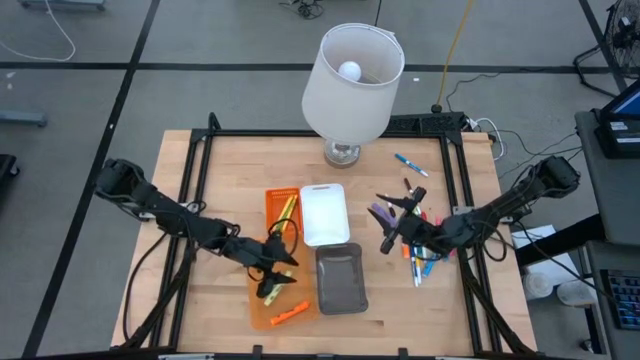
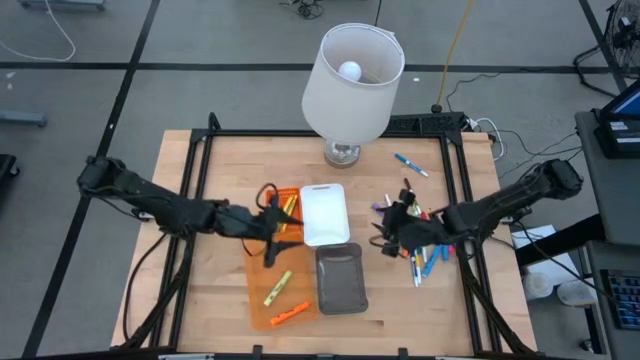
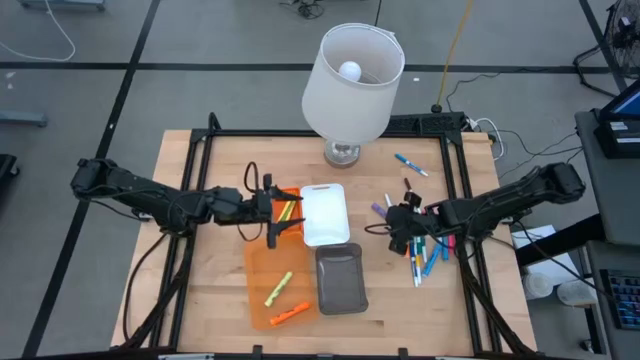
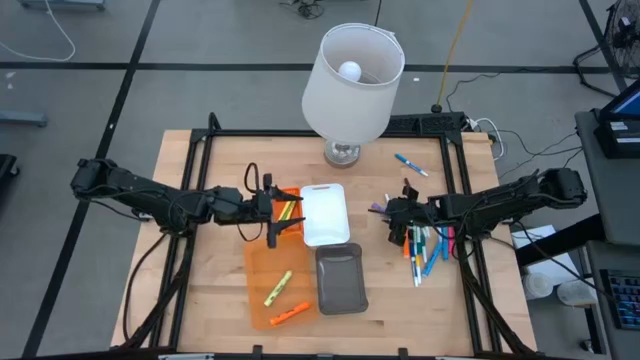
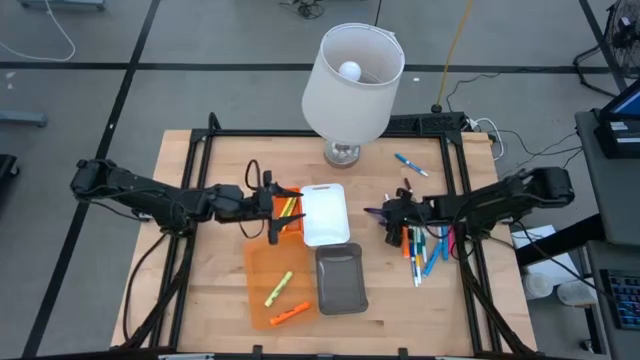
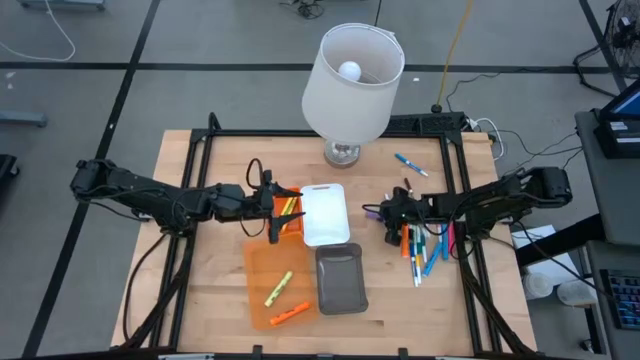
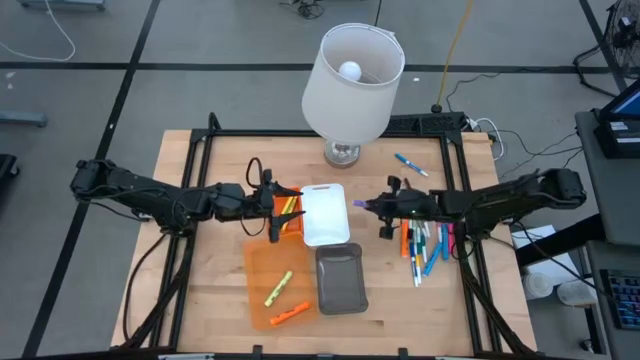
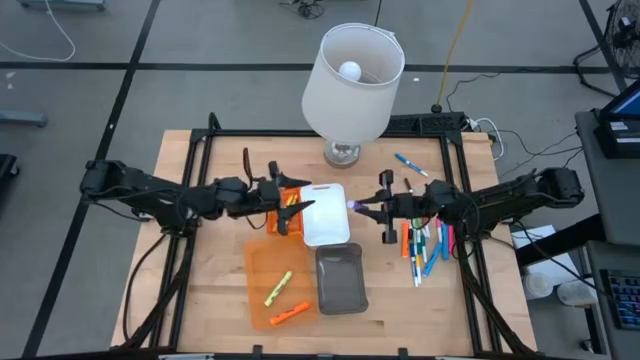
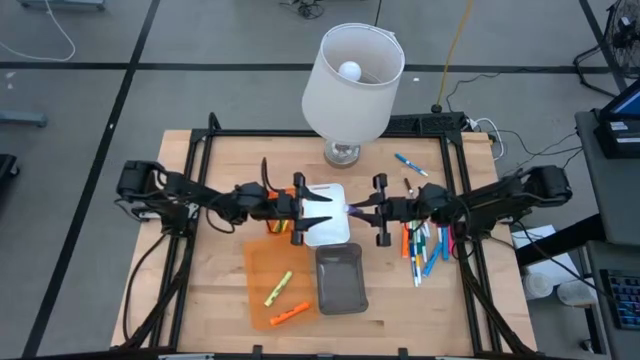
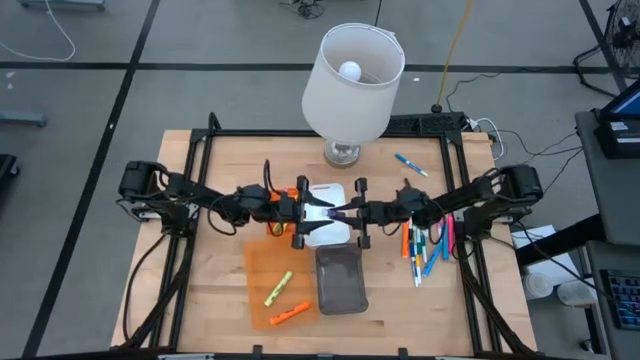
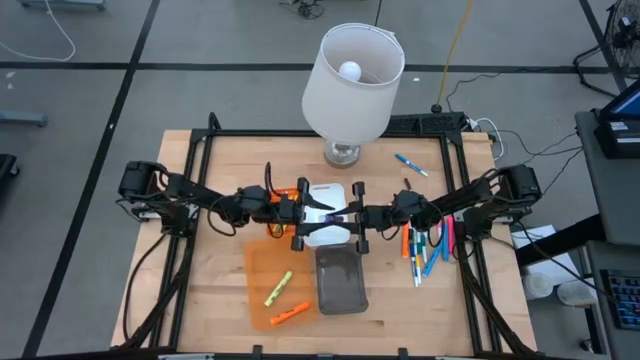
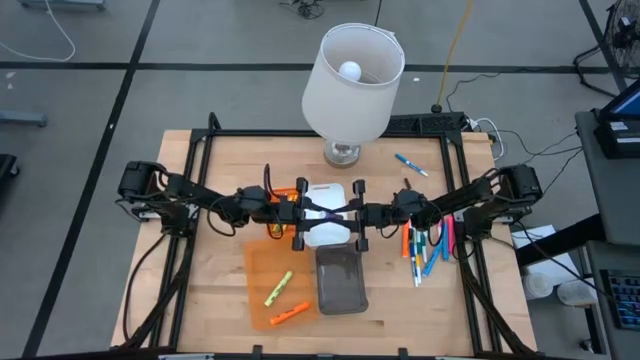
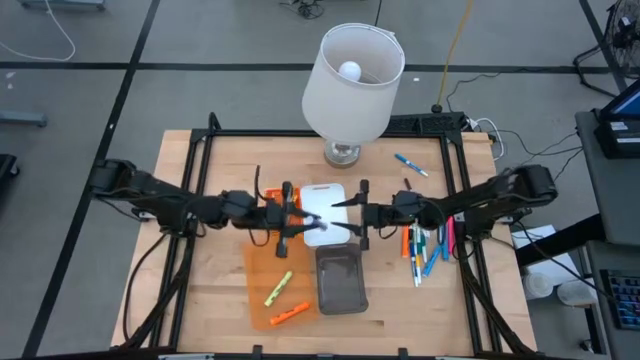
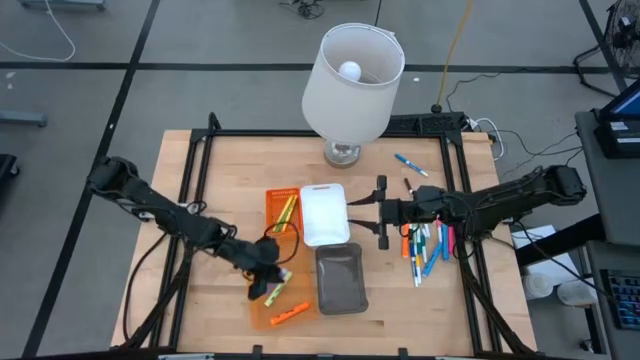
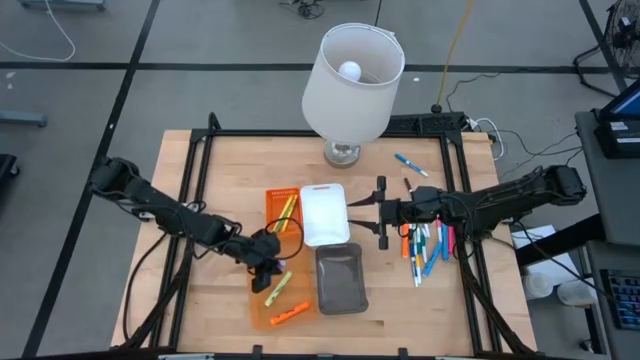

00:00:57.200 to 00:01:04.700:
Task: Pick & Place Markers
Put the purple large highlighter pen into the transparent orange bin

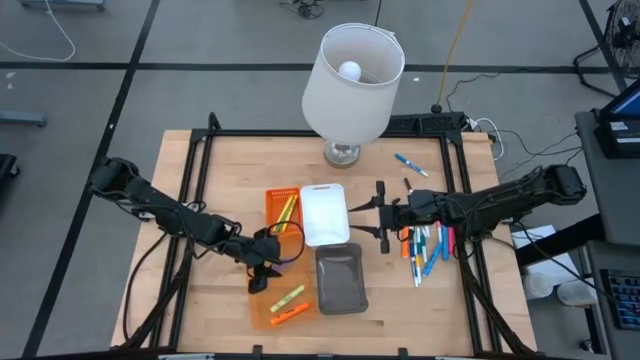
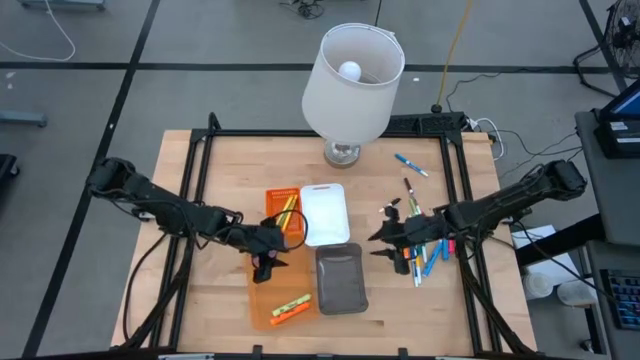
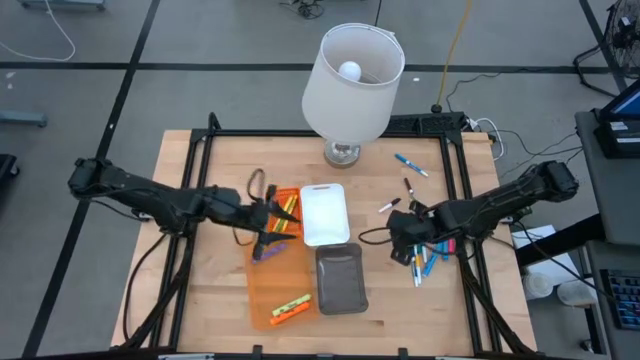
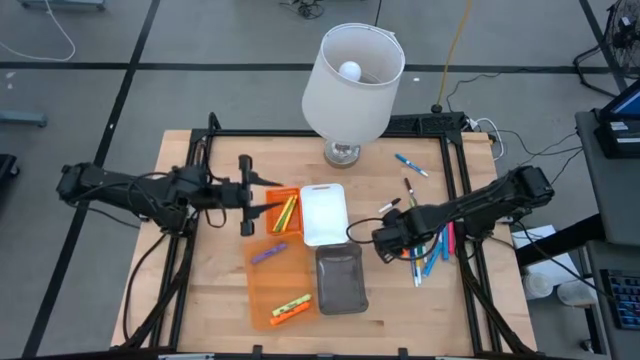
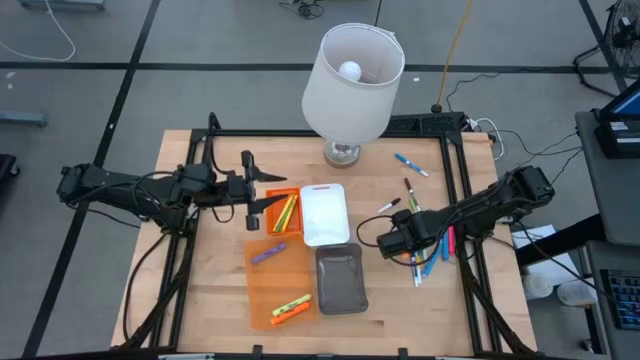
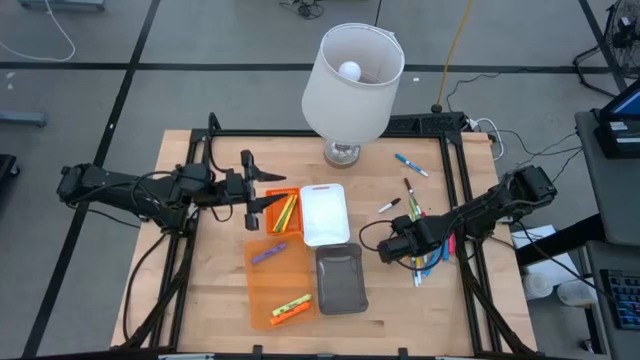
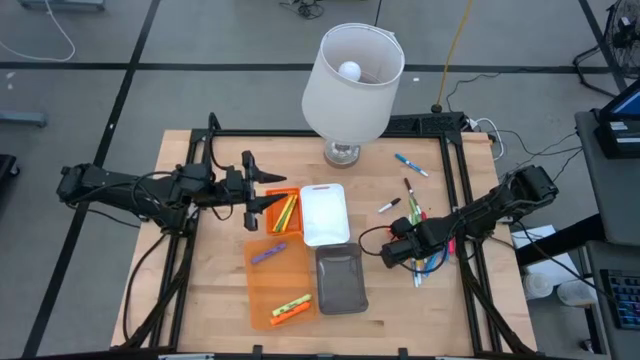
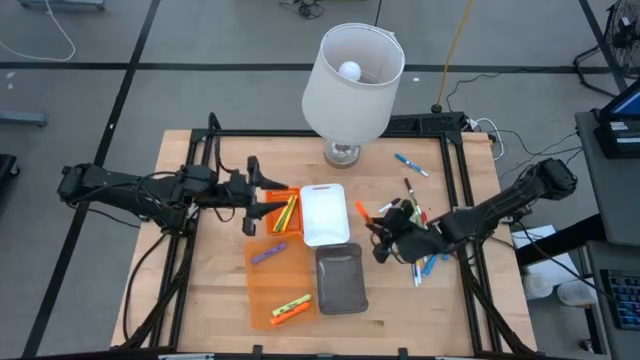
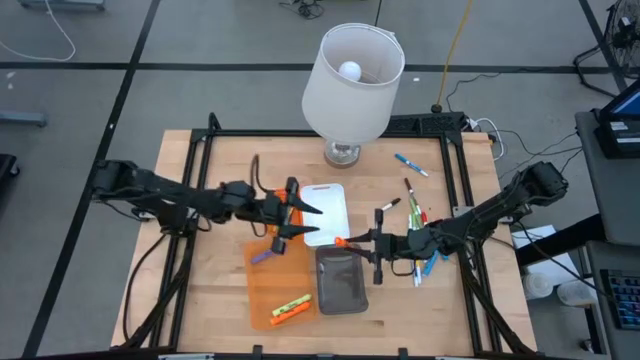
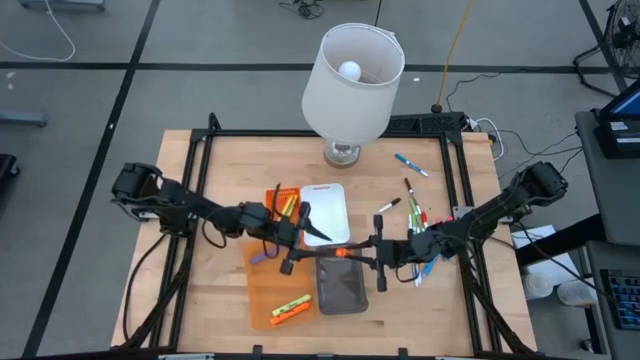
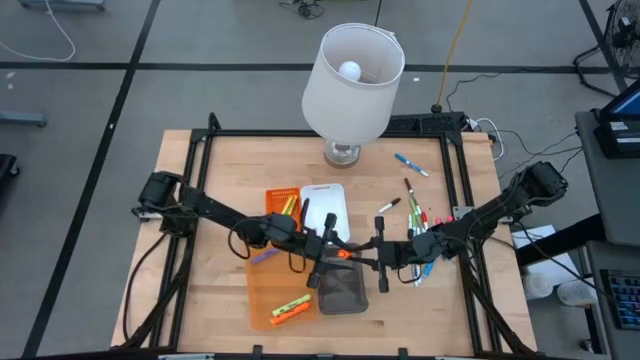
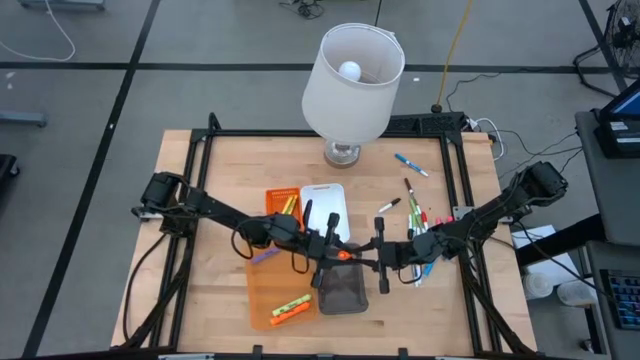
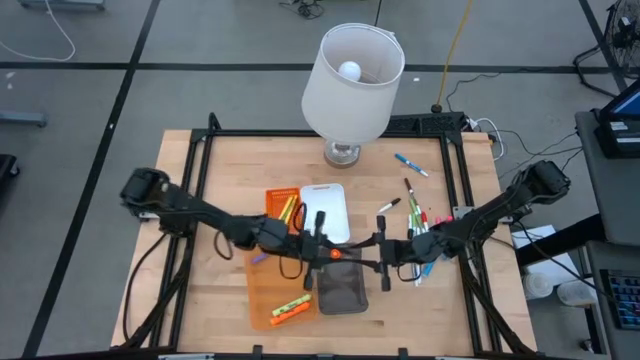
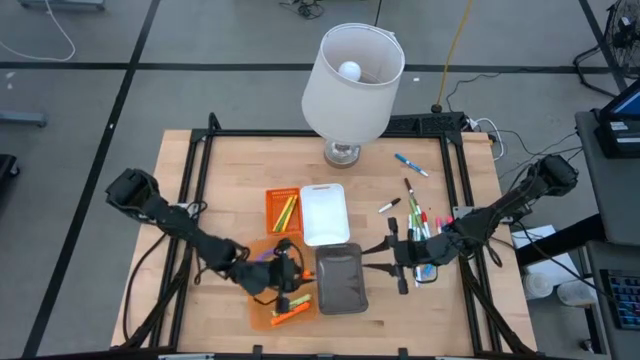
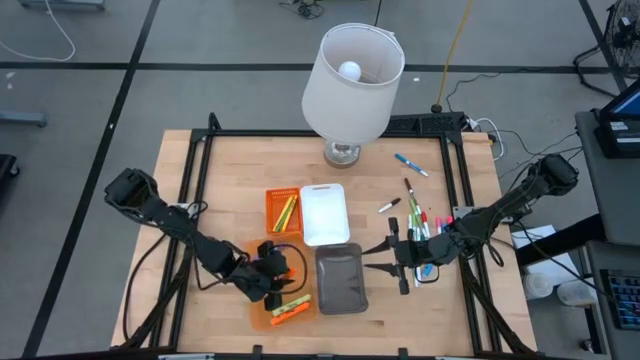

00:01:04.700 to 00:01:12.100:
Put the orange large highlighter pen into the transparent orange bin

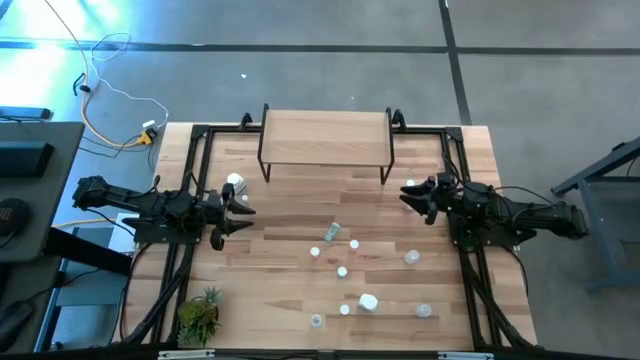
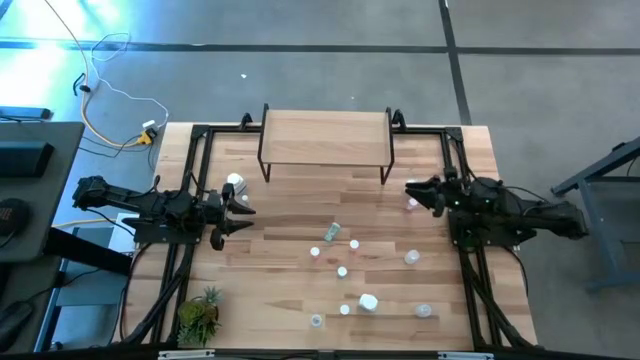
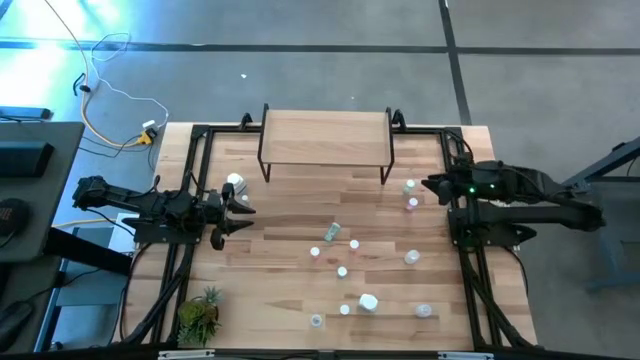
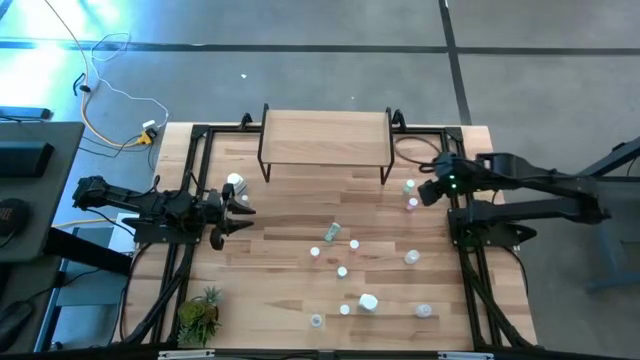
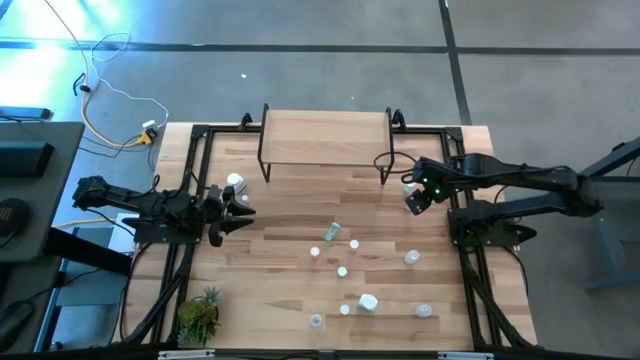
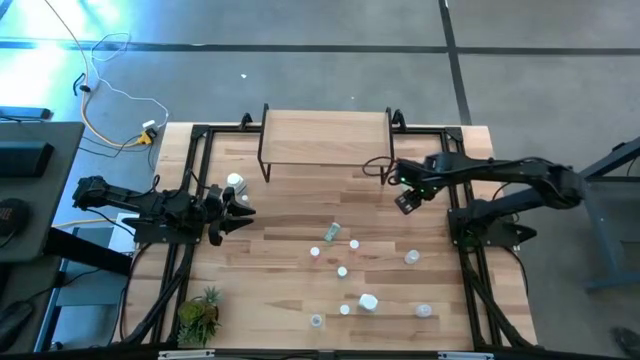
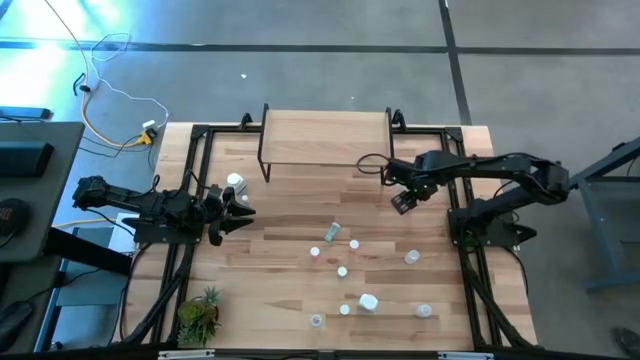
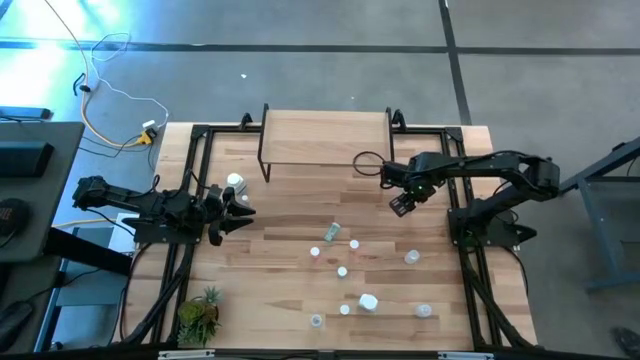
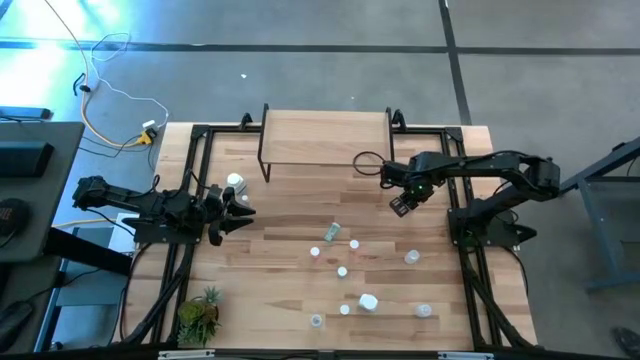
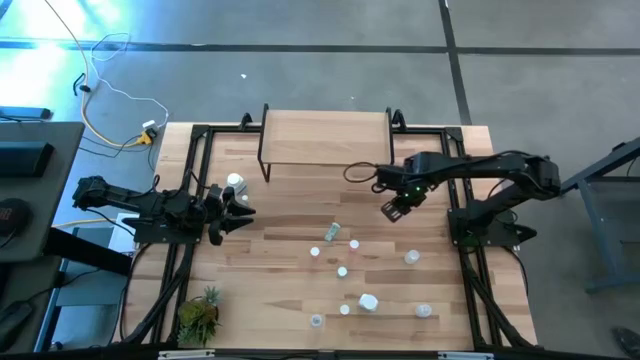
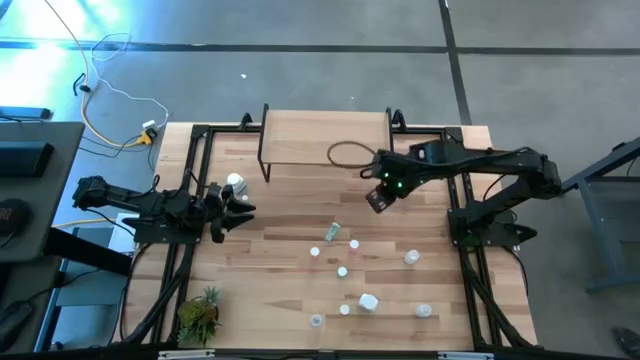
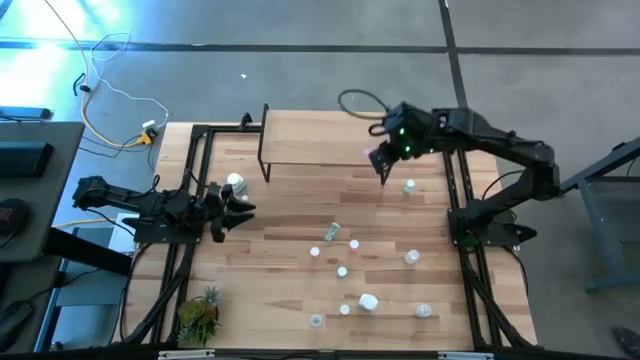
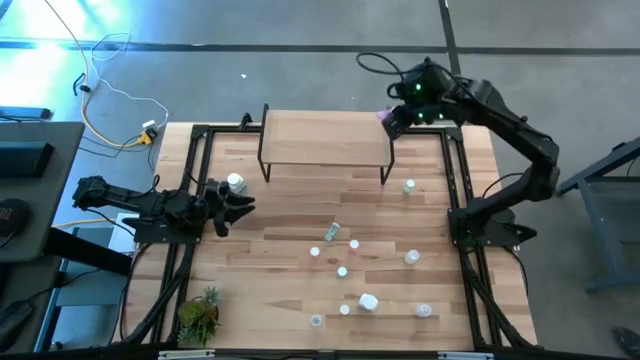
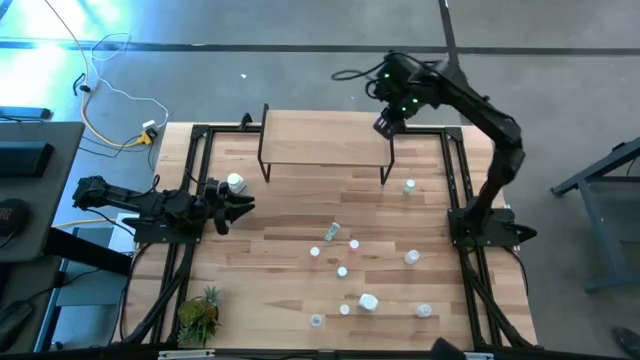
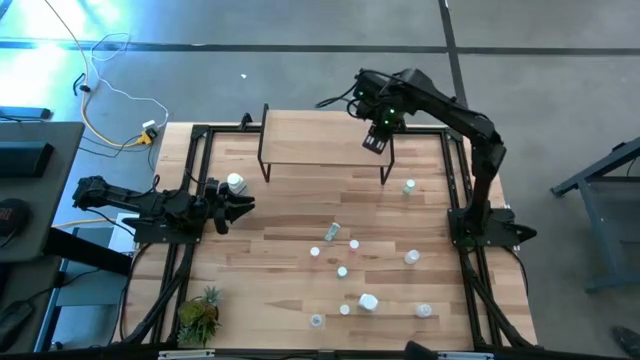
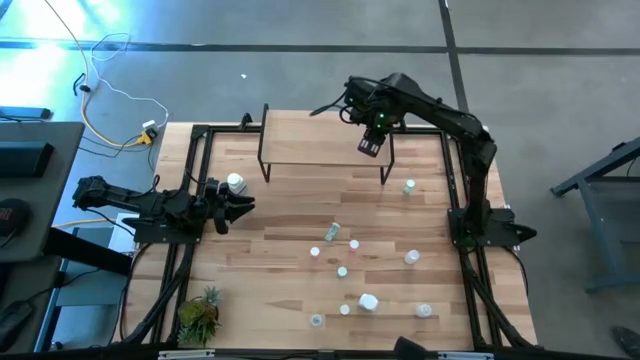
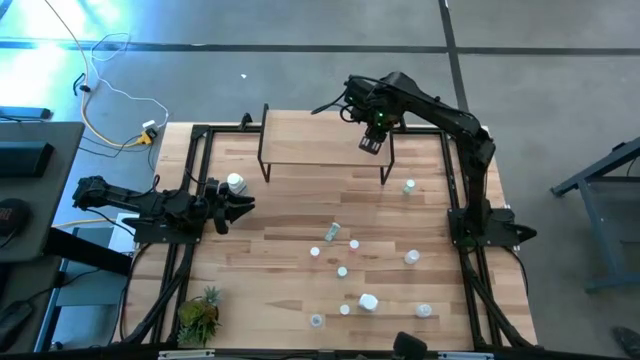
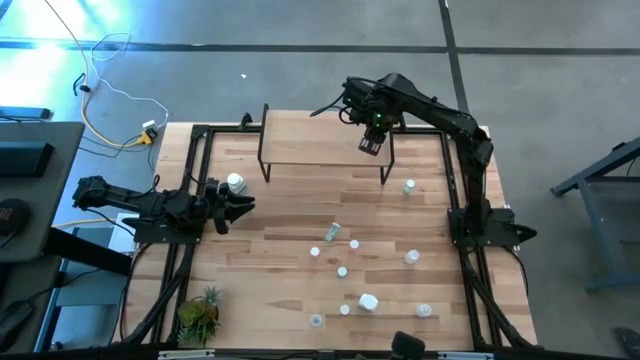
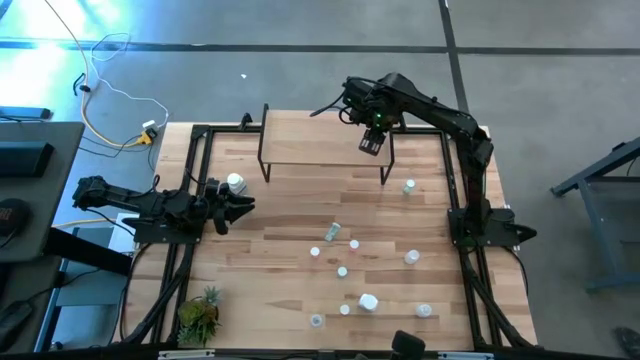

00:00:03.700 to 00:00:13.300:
Task: Pick and place medicine bottles onto shelf by color
Put the purple pill bottle on the shelf
